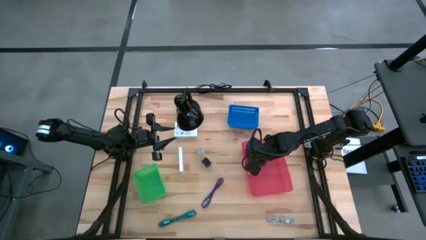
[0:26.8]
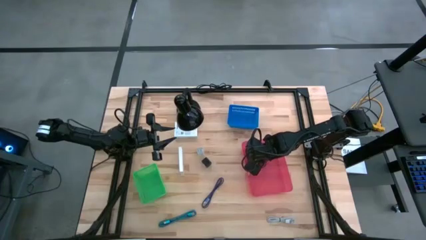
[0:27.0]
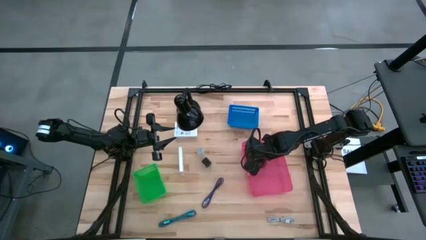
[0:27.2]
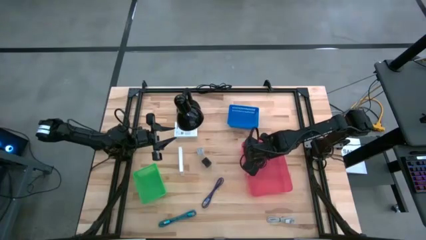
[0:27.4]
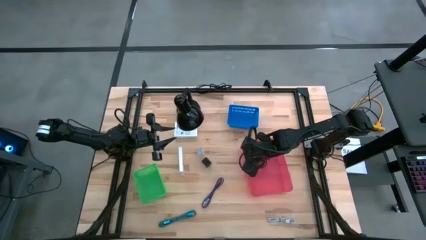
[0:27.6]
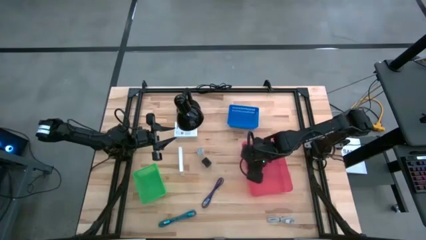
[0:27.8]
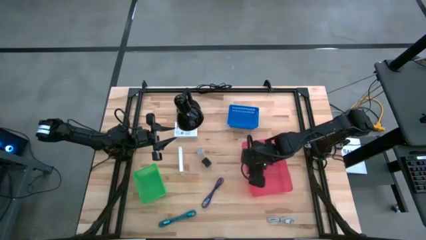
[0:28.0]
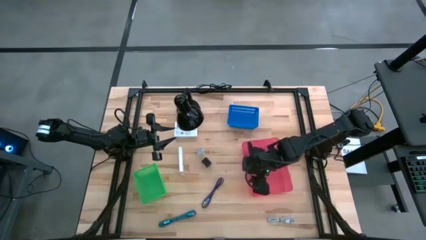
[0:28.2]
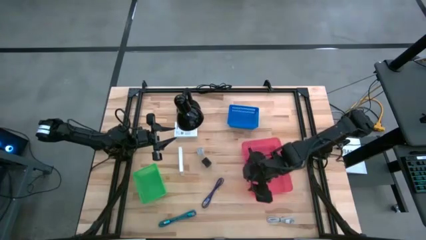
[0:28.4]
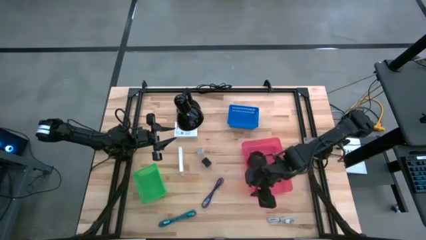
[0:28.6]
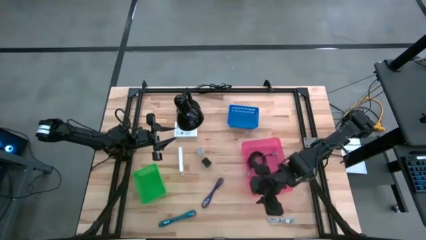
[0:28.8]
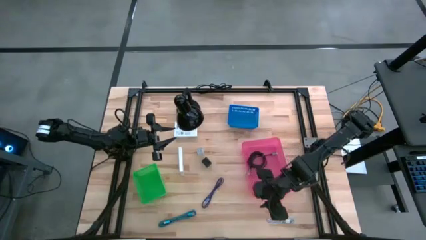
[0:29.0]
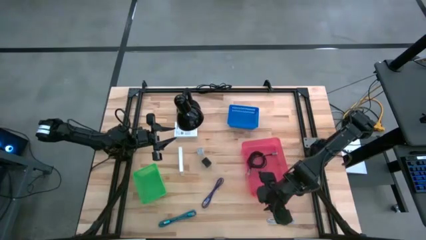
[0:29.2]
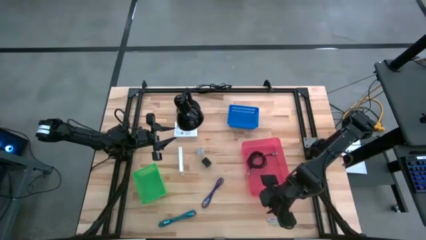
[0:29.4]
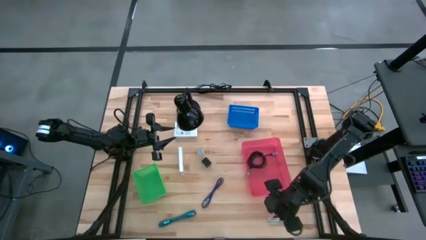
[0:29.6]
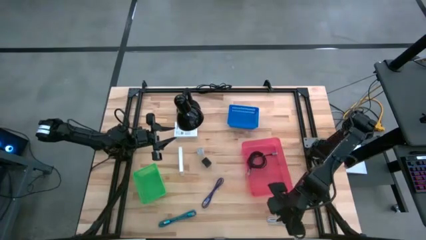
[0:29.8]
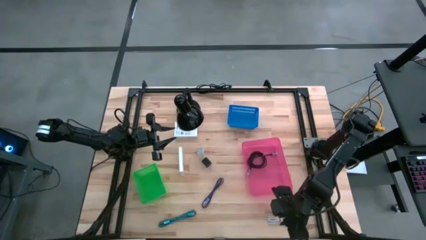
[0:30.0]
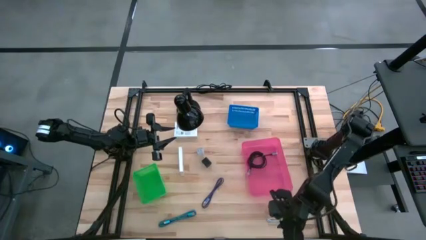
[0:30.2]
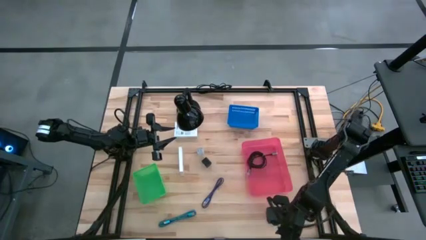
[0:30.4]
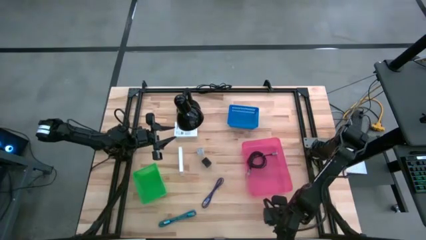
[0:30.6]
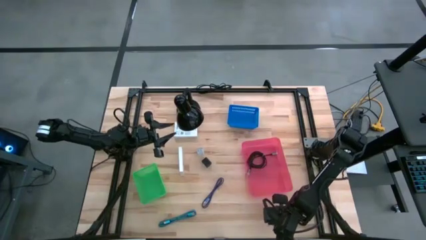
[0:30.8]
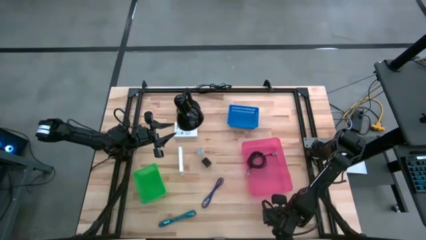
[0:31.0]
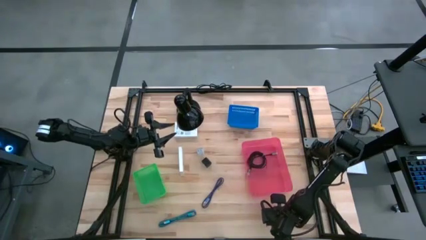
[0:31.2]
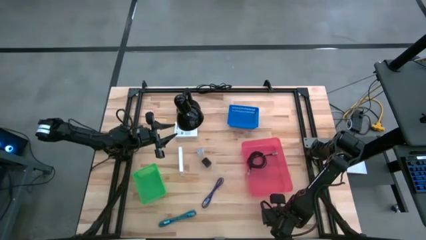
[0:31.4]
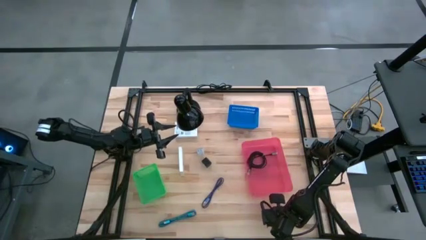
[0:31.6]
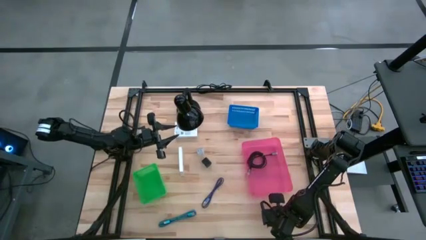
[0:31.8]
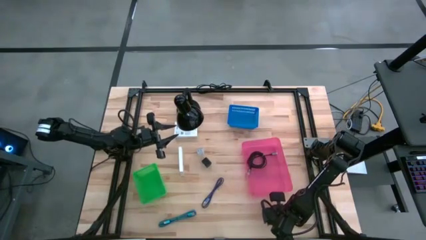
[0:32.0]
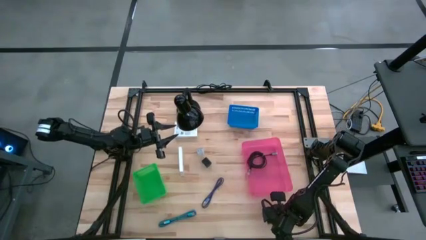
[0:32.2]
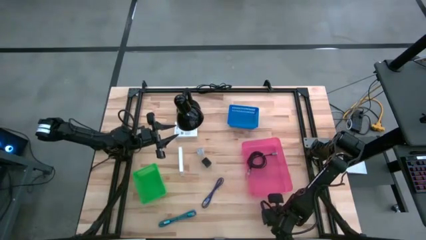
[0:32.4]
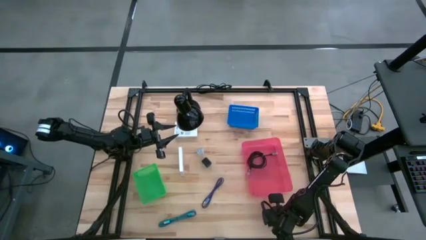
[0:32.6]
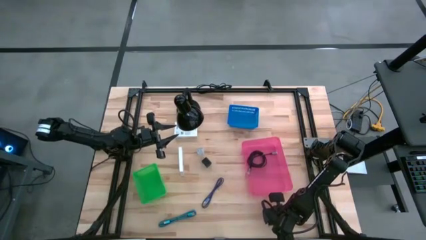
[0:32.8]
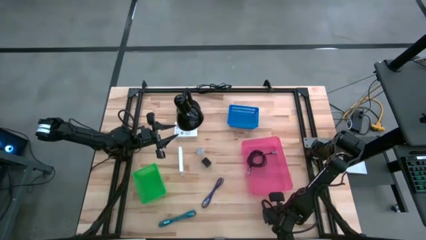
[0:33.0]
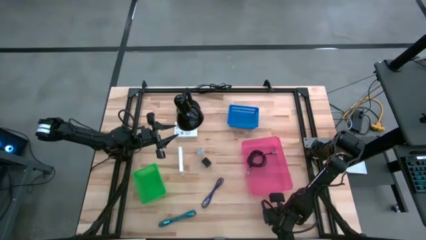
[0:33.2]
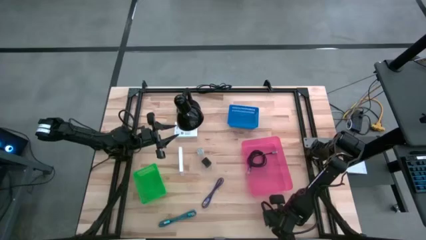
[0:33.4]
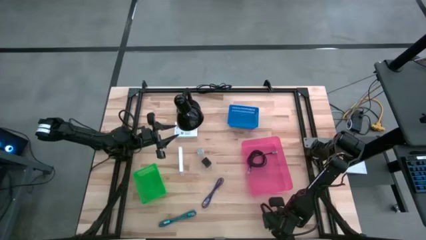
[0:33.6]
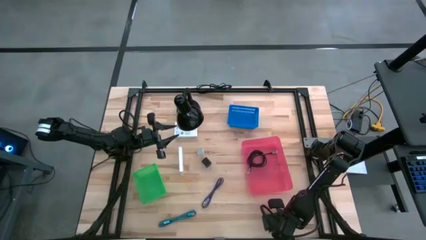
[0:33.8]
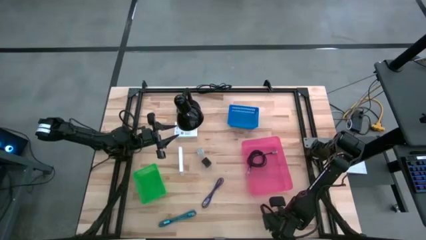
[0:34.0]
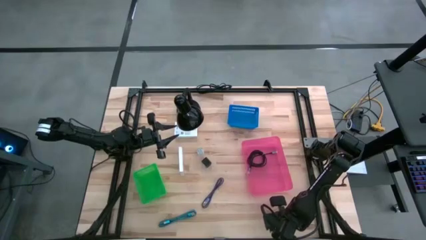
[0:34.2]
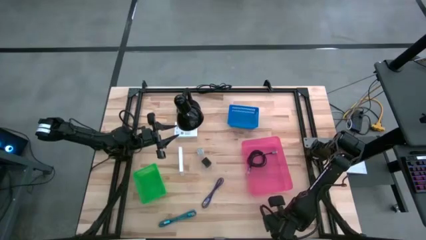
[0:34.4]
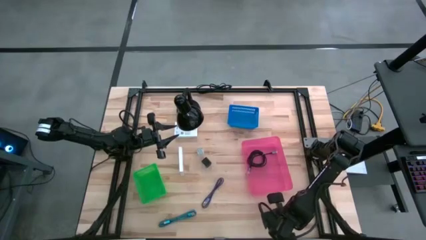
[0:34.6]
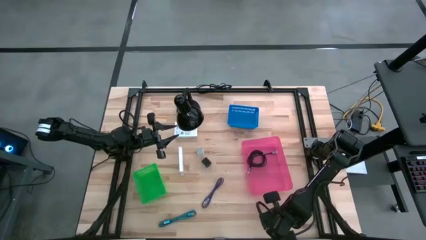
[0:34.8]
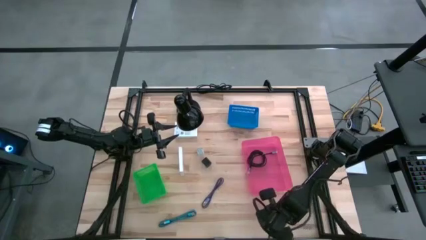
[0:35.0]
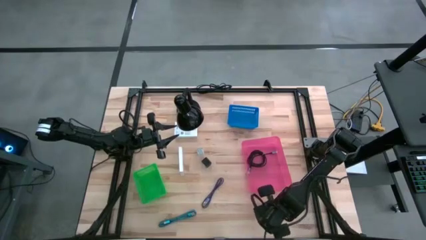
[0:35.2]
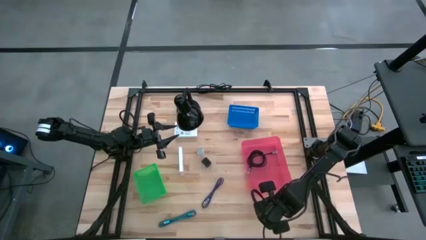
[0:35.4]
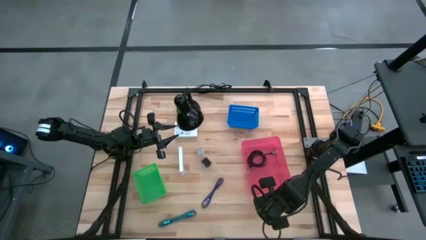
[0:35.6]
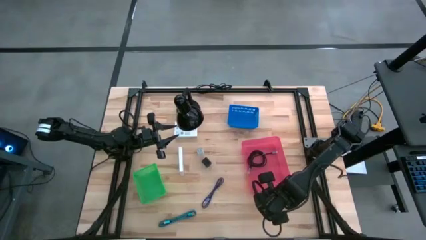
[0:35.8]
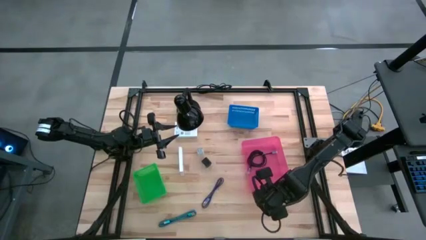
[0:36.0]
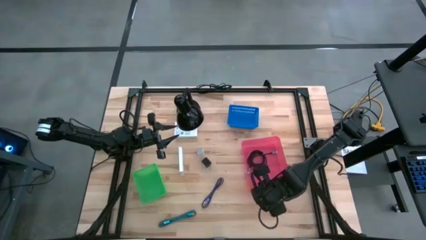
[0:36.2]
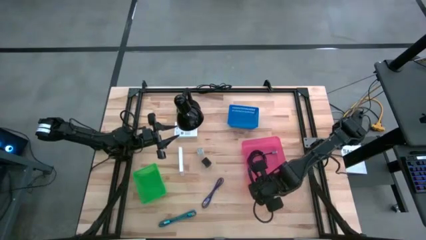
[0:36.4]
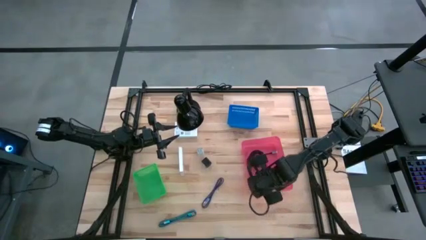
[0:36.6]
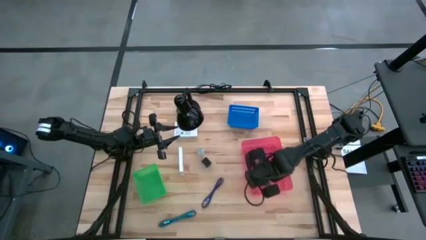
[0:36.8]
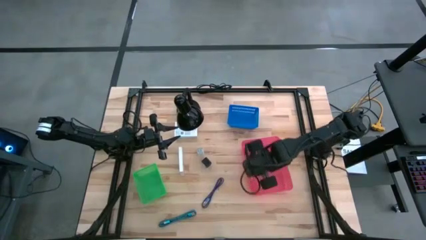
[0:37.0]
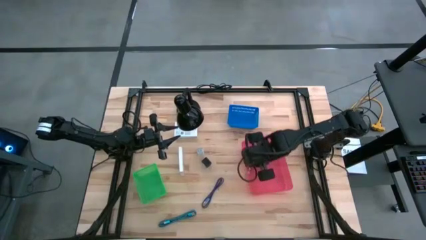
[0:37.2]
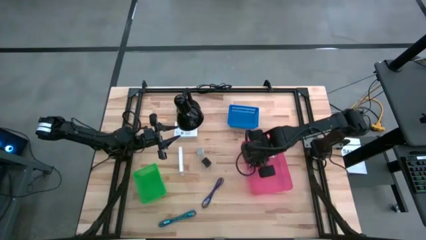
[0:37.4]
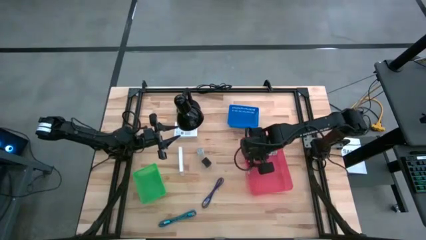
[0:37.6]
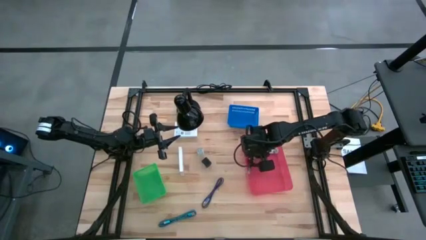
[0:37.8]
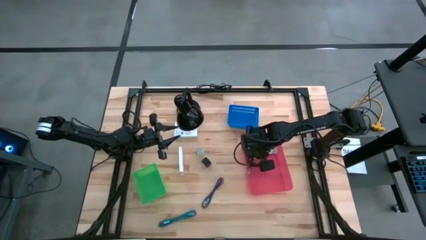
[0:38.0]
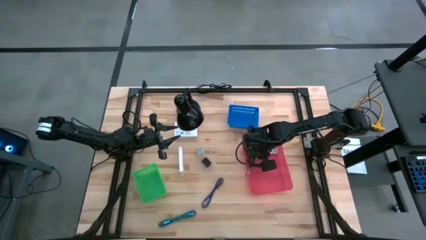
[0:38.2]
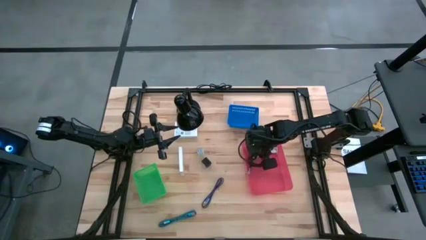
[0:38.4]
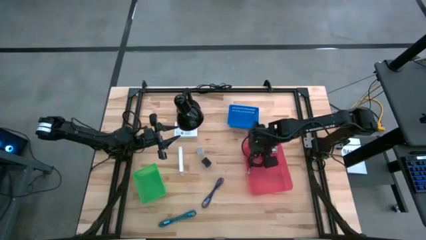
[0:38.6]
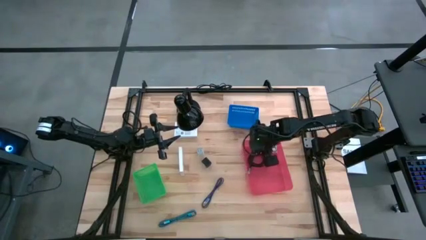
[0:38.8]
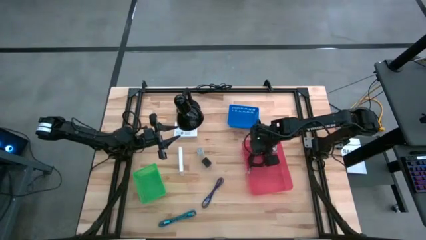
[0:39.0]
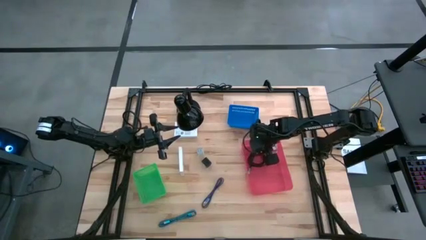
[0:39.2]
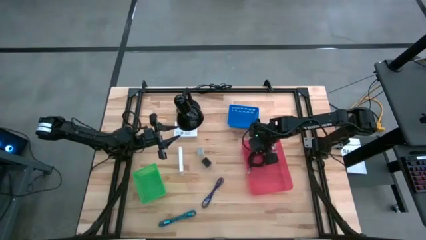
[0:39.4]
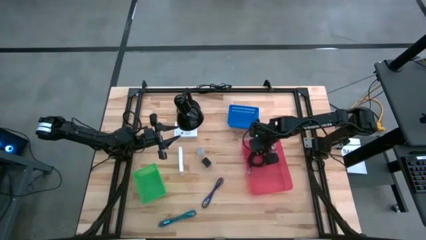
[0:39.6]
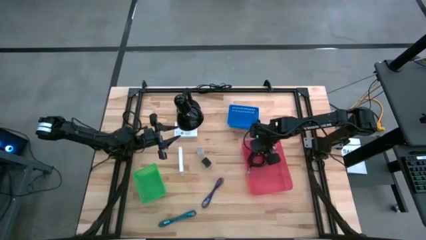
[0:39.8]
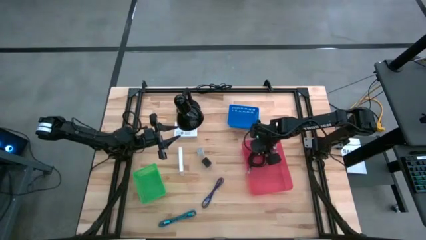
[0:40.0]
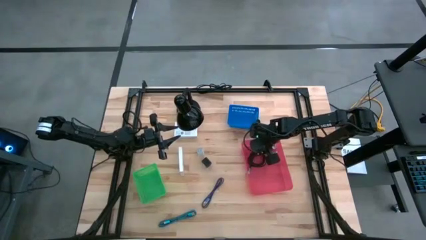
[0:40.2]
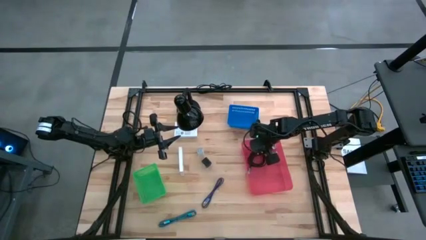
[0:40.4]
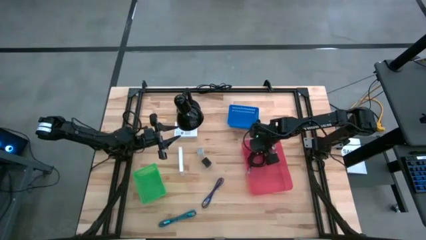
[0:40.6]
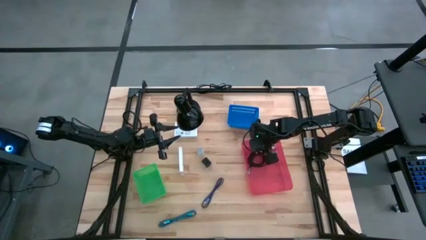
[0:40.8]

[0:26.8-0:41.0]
Task: Pick and place items into bin
Put the white charger cable into the pink bin

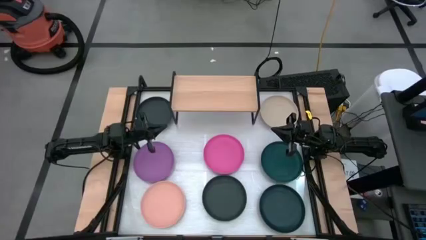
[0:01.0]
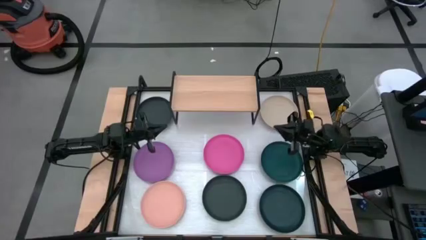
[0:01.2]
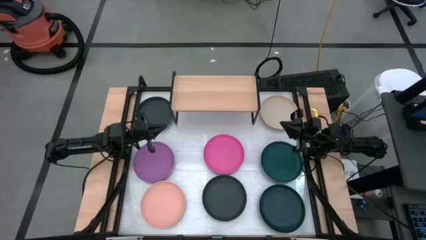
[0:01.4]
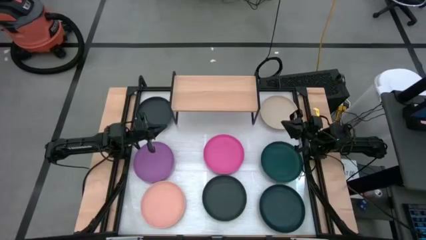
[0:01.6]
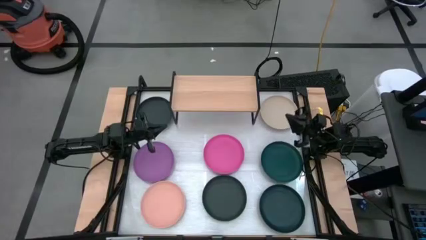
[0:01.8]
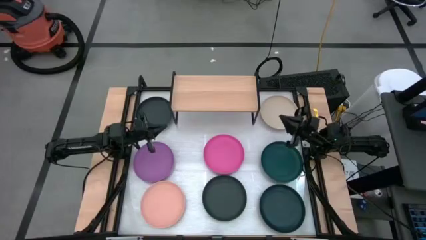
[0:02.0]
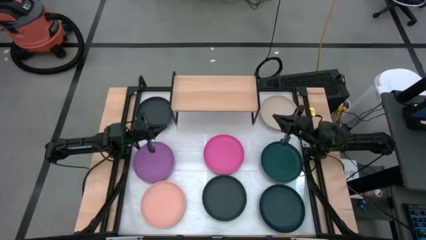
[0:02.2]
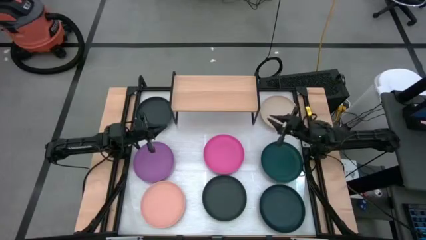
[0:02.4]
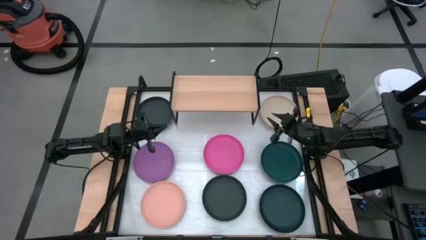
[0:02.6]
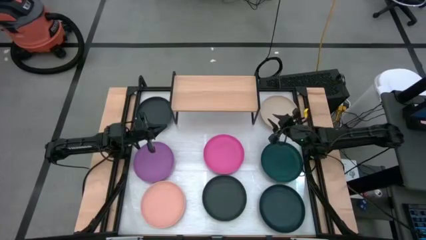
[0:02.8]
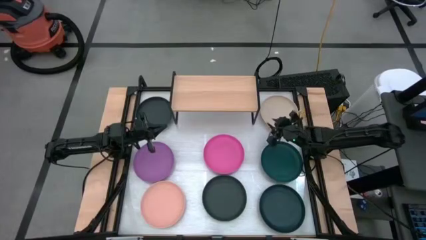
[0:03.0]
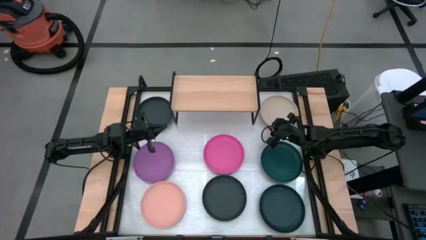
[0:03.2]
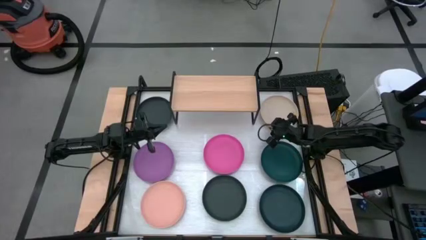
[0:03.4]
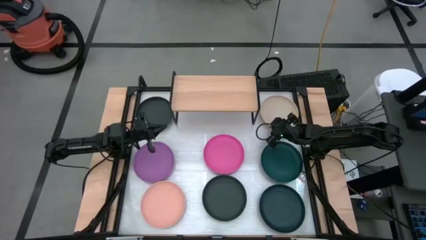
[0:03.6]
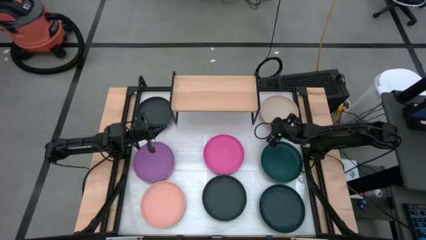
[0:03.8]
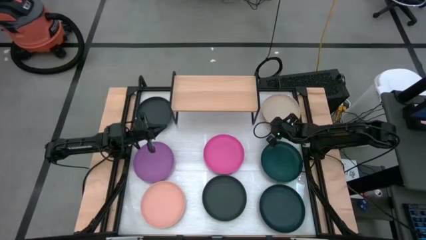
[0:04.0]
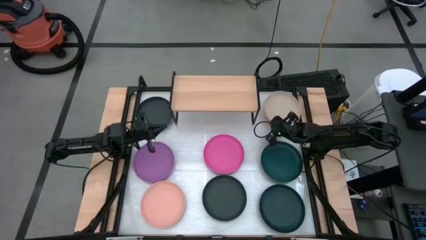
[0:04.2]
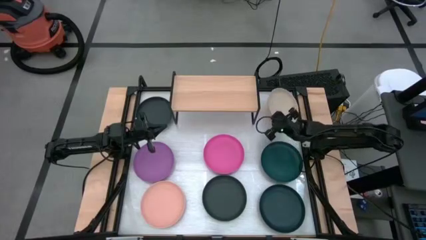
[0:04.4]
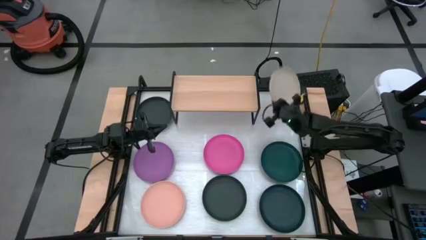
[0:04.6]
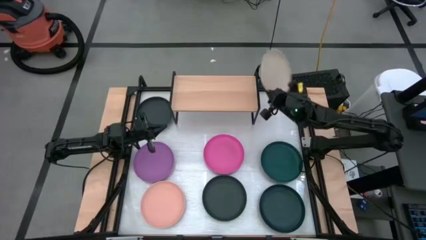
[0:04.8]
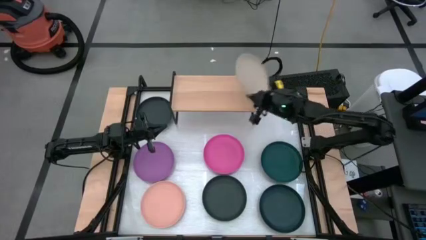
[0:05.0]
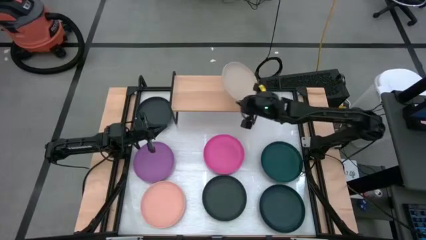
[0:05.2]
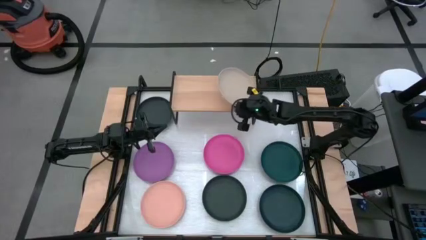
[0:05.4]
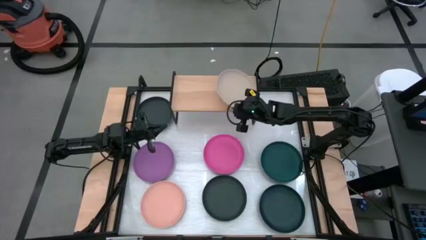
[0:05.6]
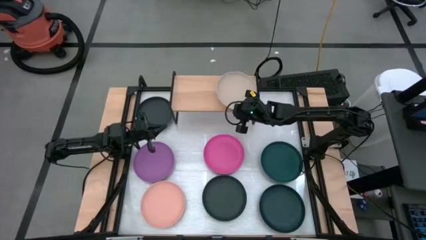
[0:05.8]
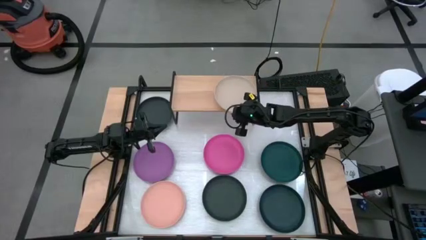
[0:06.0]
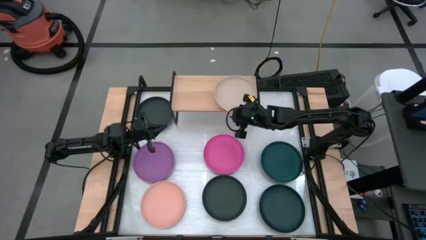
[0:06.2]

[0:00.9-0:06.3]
Task: Place and stack plates onto a shelf
Put the light brown plate on the shelf
